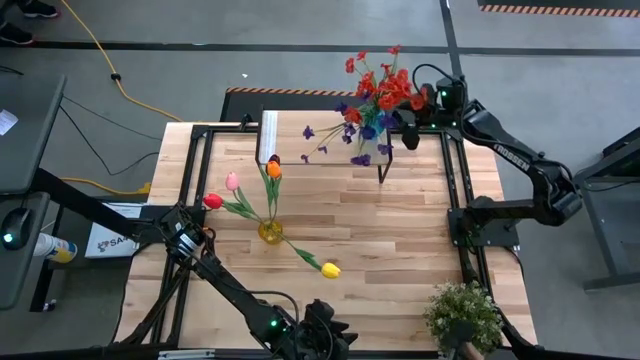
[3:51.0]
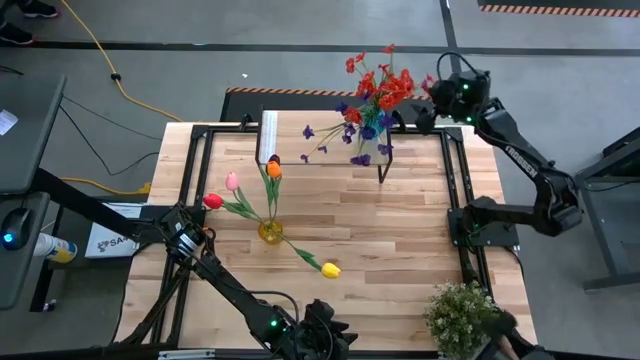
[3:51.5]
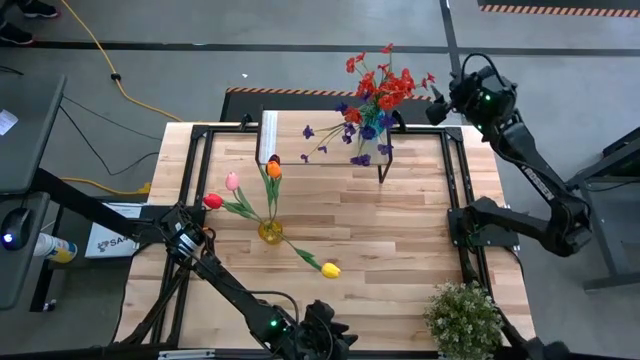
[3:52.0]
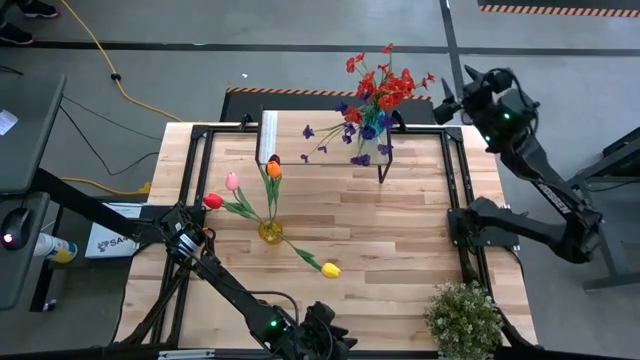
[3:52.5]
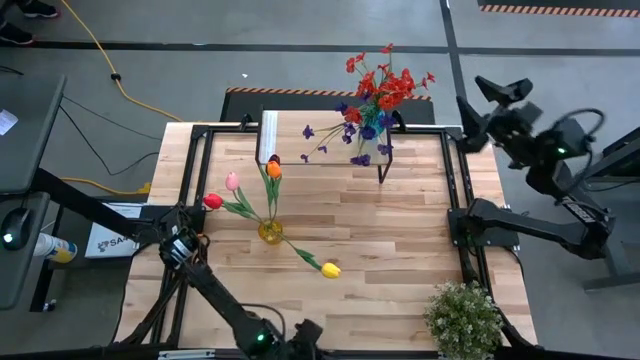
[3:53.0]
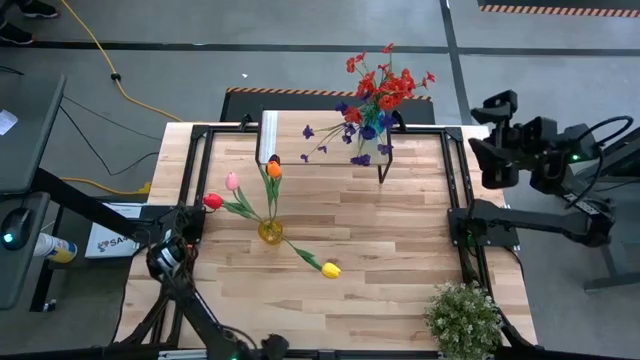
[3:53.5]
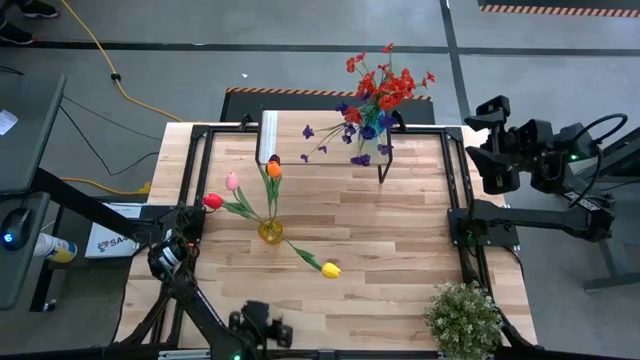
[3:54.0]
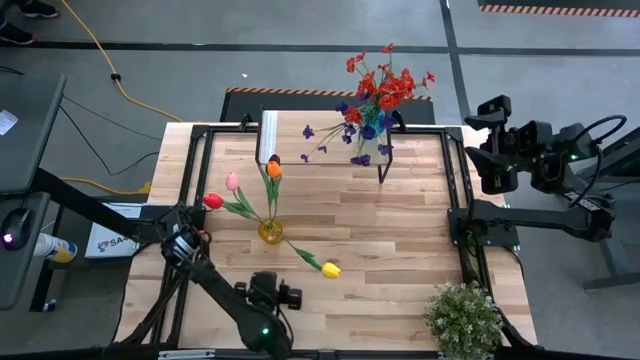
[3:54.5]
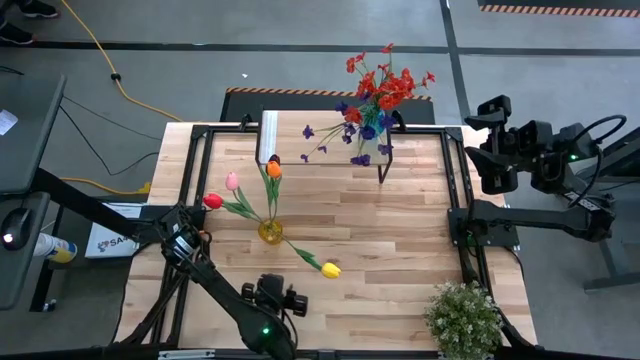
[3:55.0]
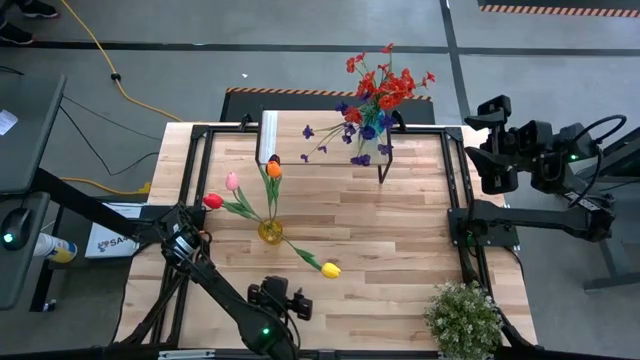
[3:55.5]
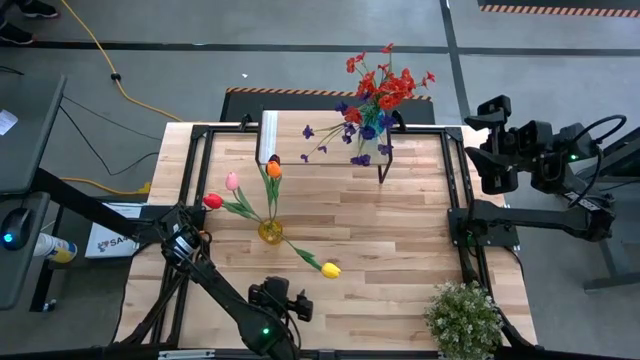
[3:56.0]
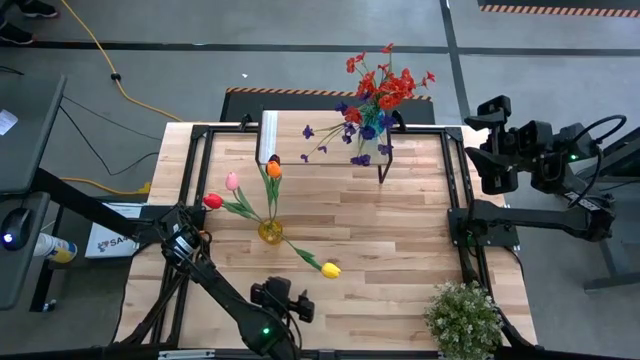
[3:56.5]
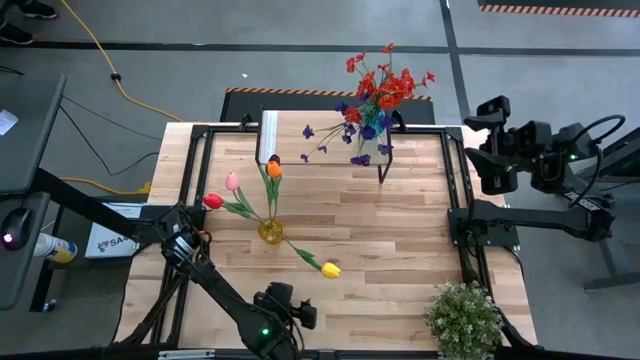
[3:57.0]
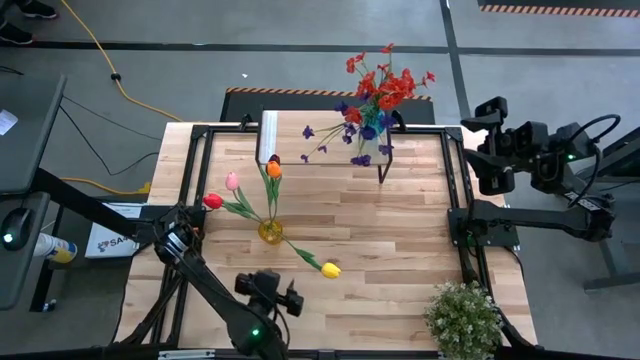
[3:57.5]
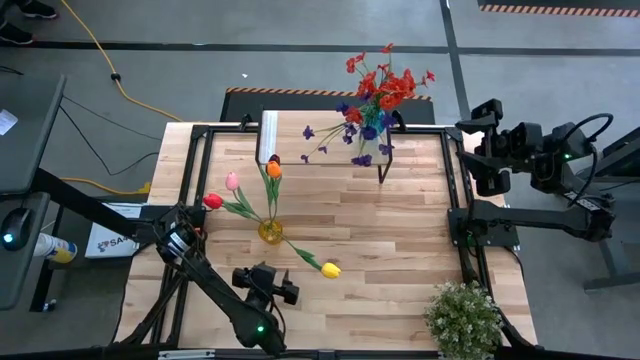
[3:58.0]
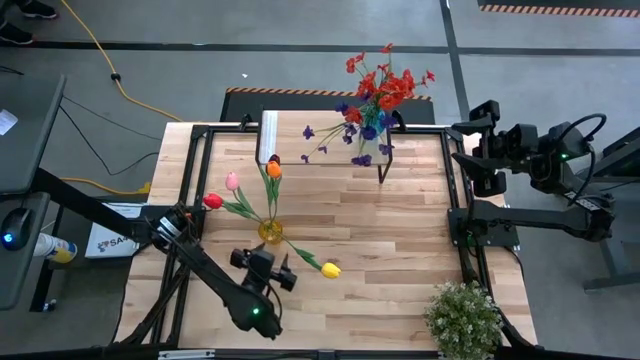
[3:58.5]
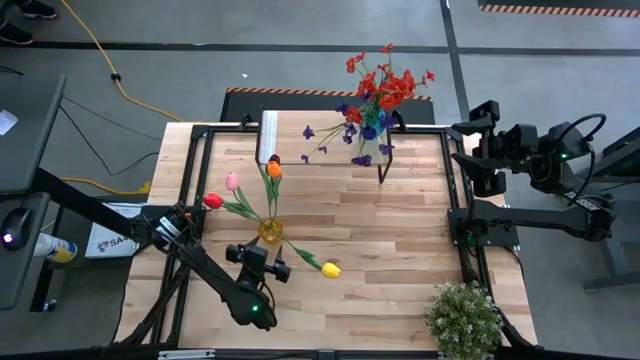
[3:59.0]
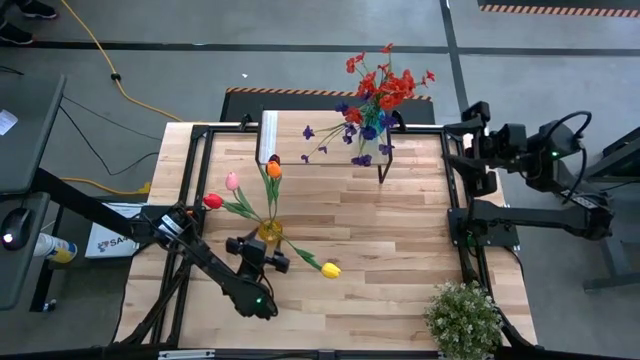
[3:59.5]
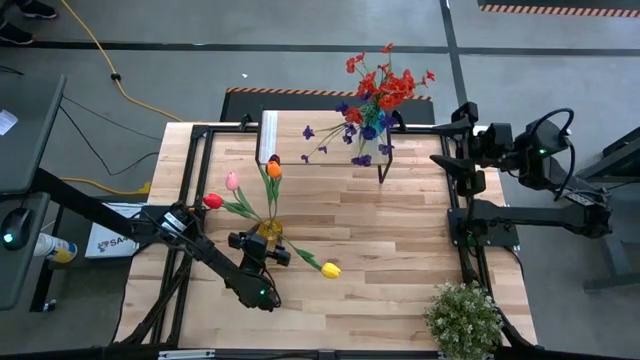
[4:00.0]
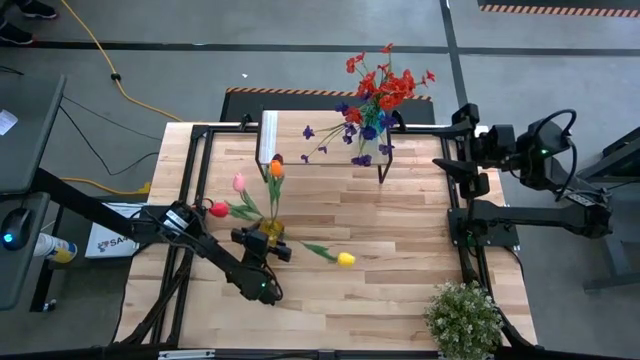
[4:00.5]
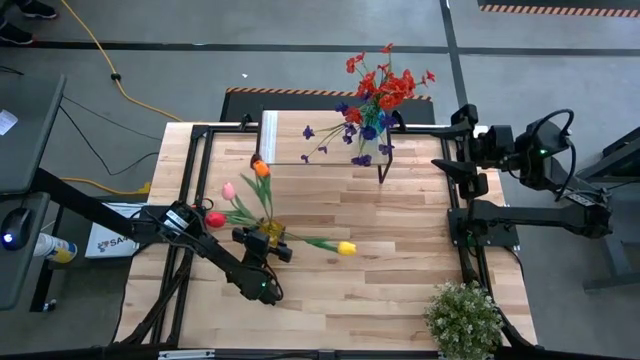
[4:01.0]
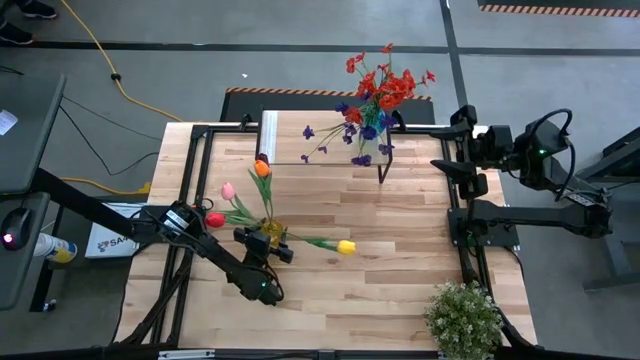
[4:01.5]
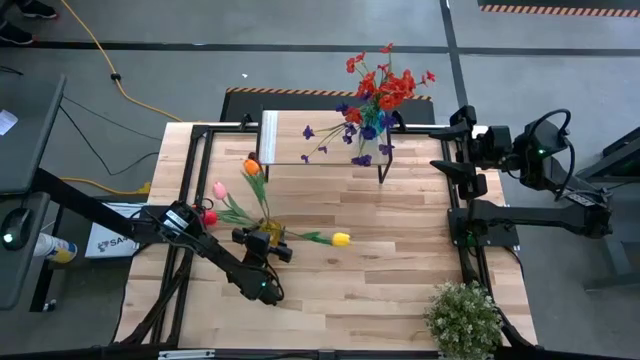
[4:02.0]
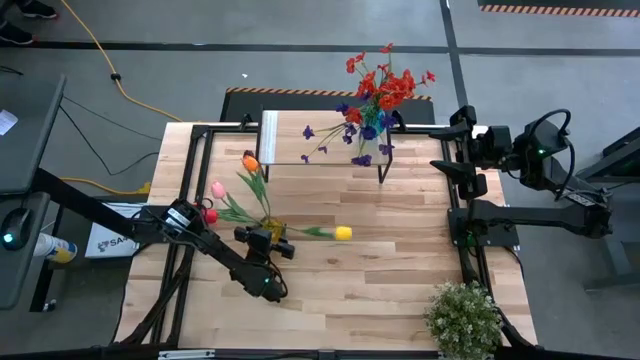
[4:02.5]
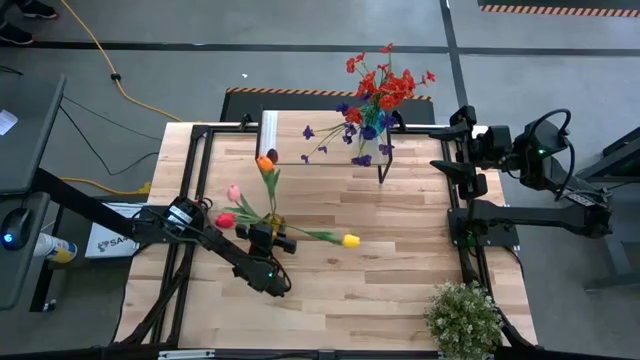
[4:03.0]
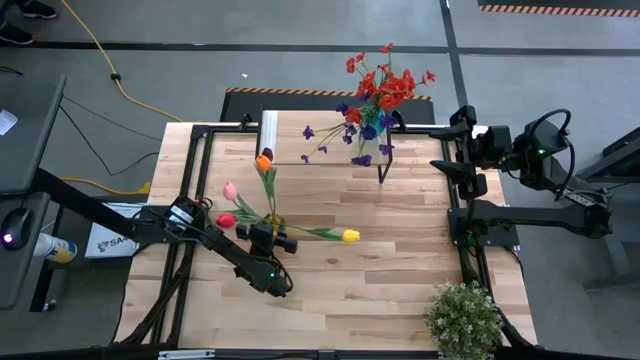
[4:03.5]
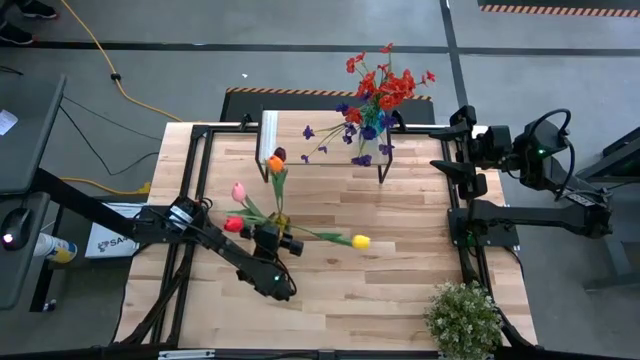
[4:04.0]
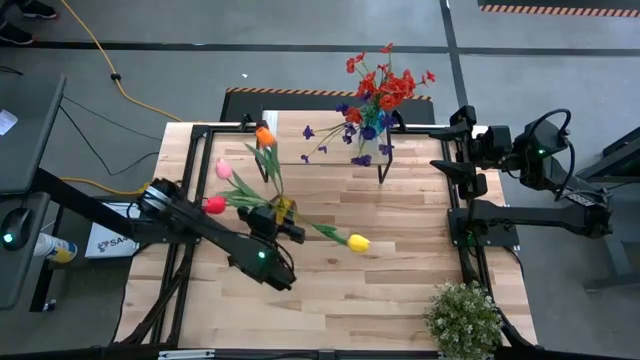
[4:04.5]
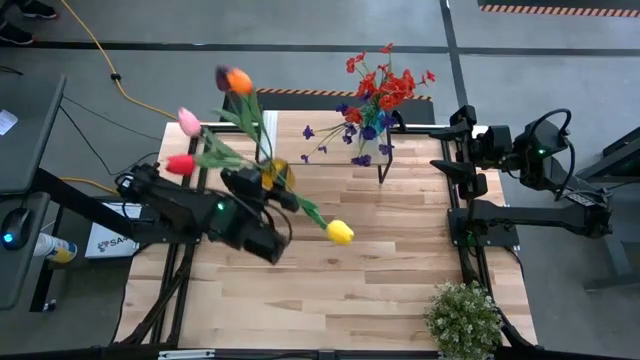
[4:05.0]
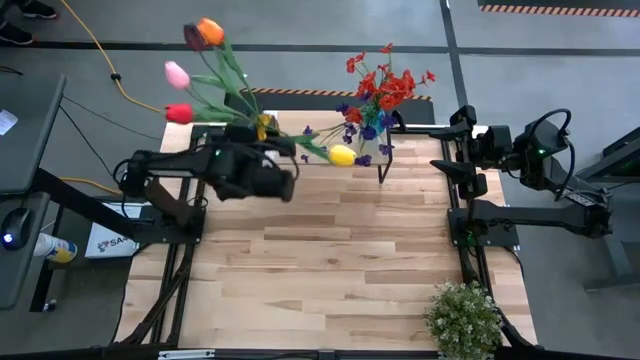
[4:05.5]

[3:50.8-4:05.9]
Task: Pick and place flowers into a vace then onto a shelf
Put the yellow vase with flowers on the shelf

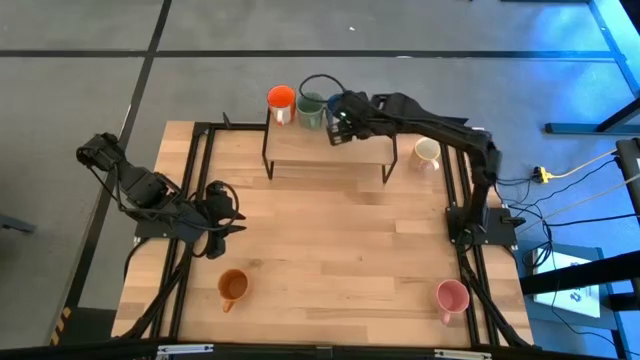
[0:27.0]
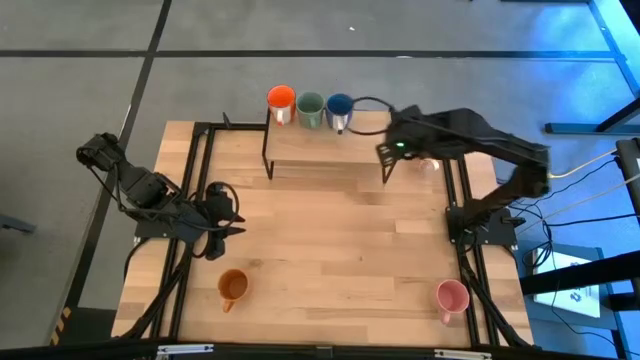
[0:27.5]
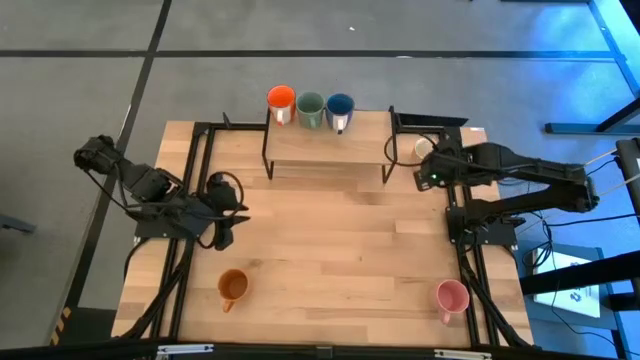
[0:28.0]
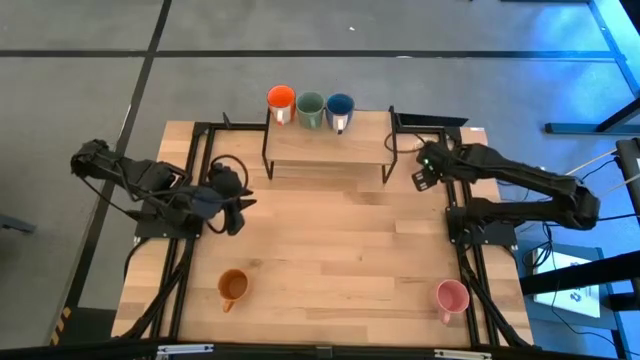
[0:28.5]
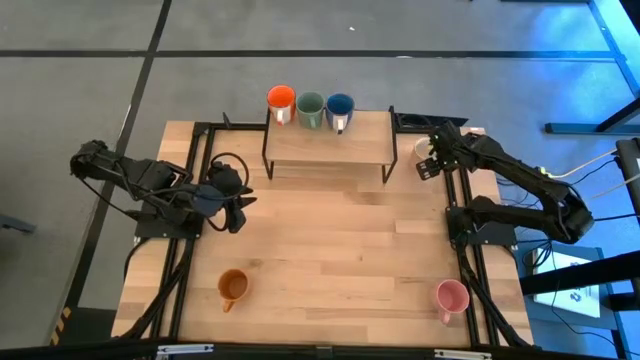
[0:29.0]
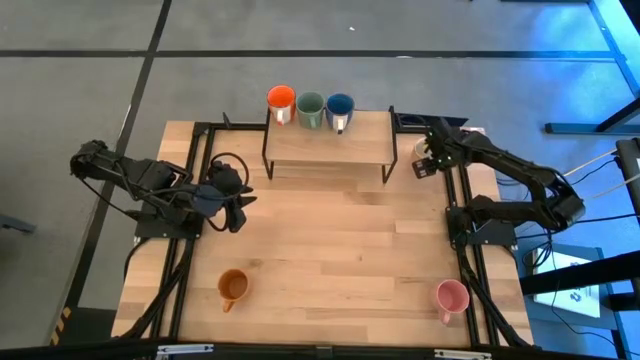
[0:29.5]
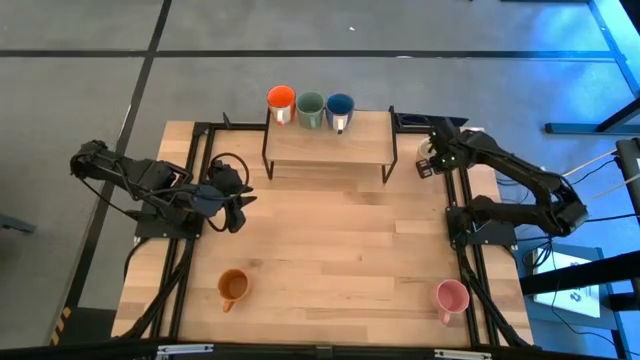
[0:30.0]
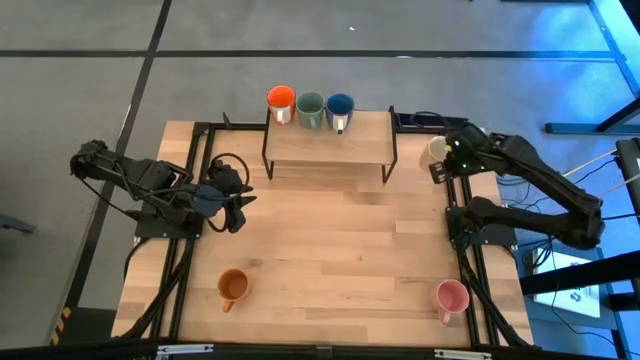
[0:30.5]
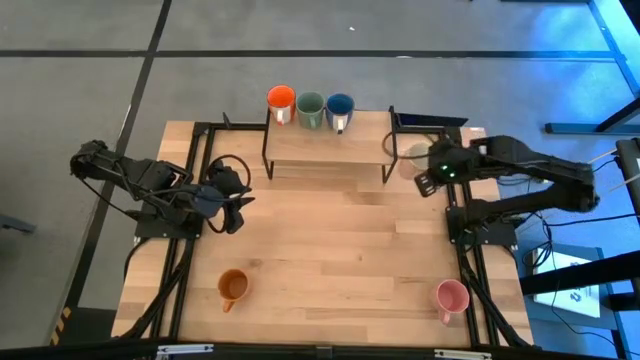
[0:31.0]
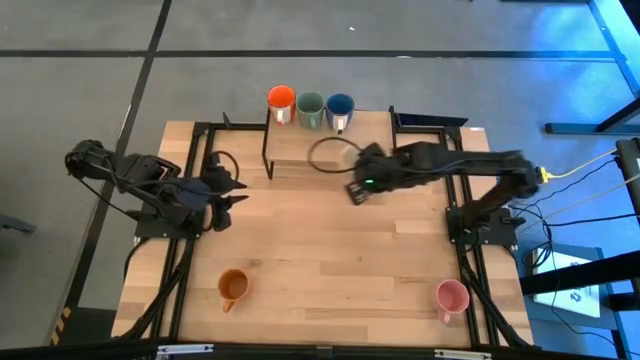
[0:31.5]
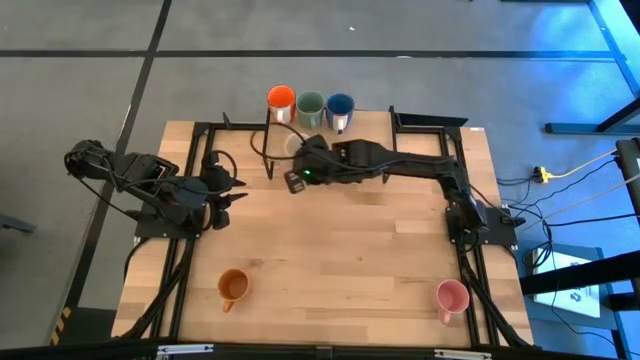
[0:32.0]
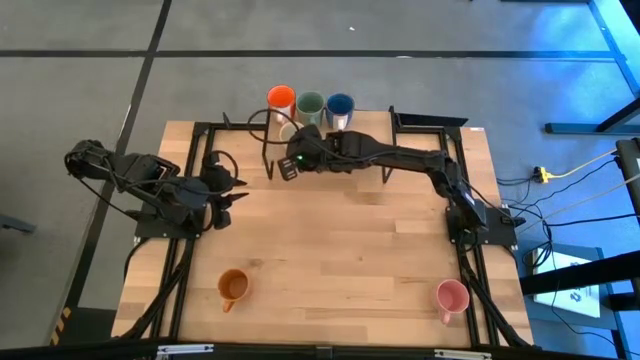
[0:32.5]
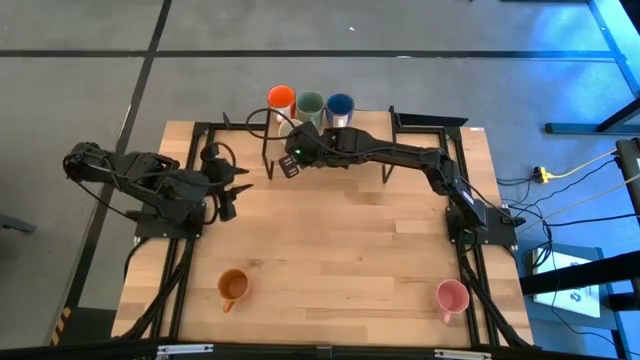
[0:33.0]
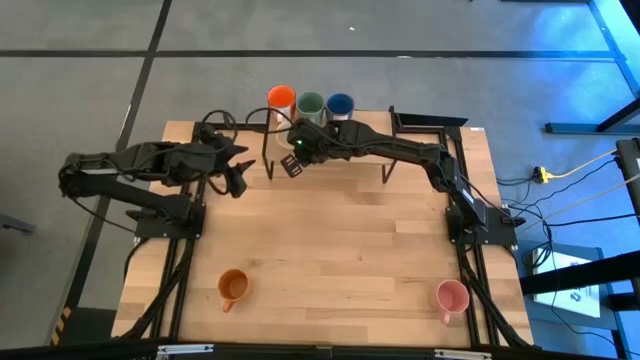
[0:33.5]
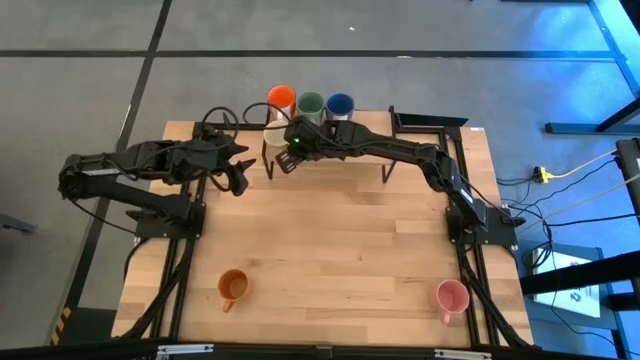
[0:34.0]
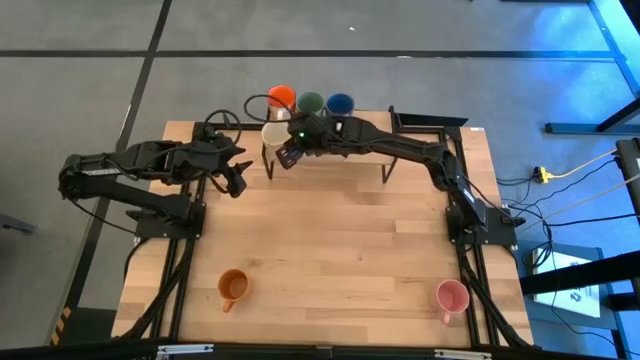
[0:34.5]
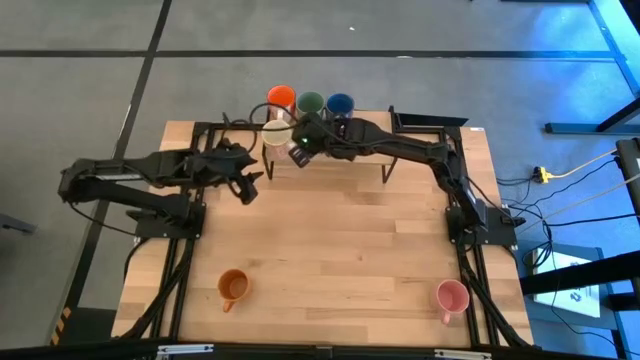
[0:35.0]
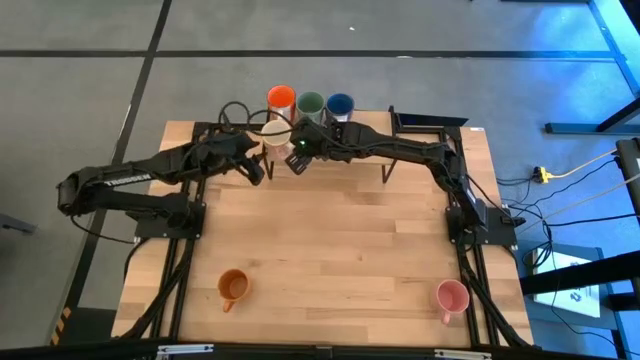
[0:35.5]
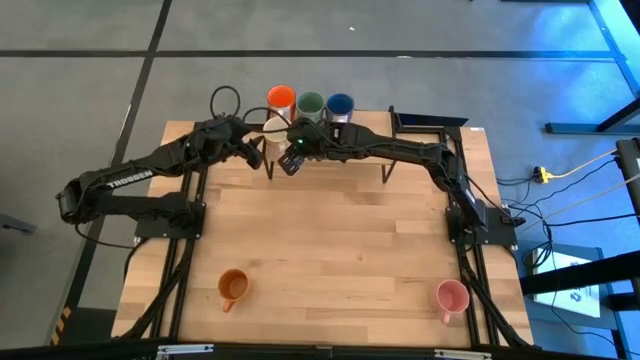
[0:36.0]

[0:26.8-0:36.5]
Task: Place coffee mugs
Put the patterned yellow mug on the shelf
